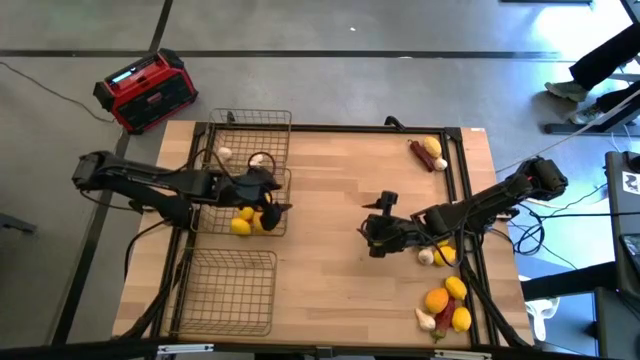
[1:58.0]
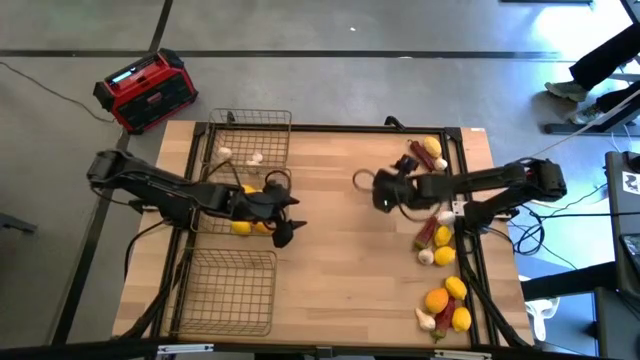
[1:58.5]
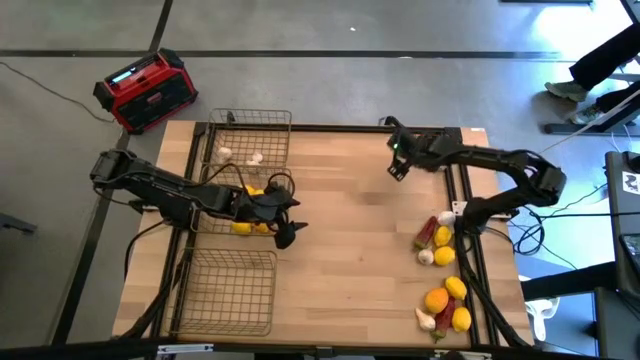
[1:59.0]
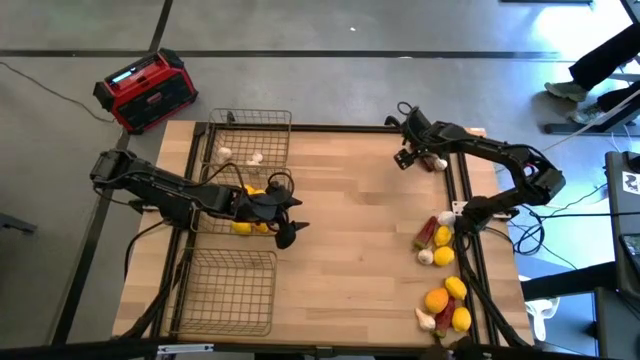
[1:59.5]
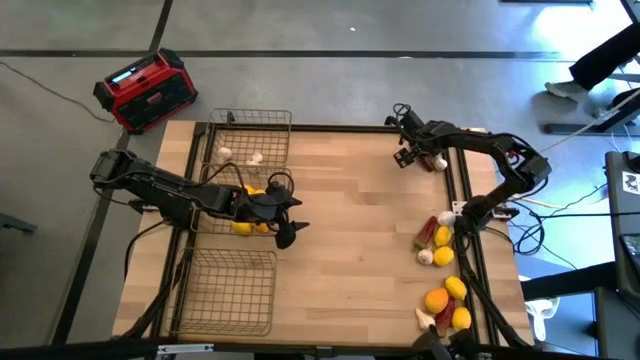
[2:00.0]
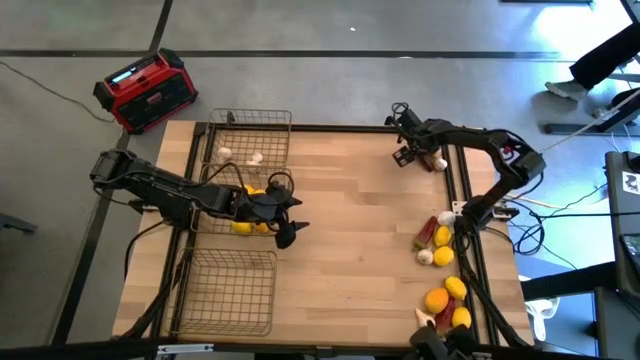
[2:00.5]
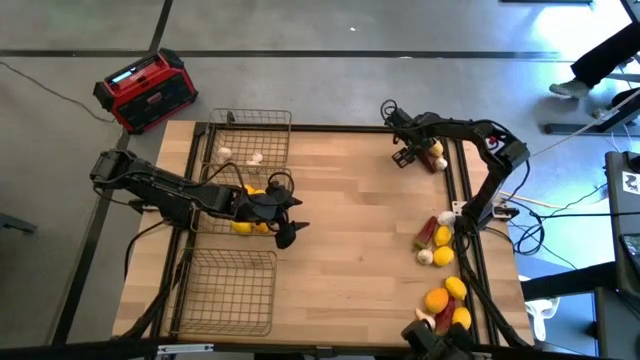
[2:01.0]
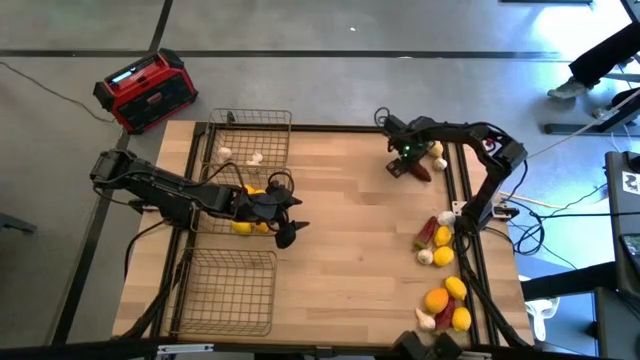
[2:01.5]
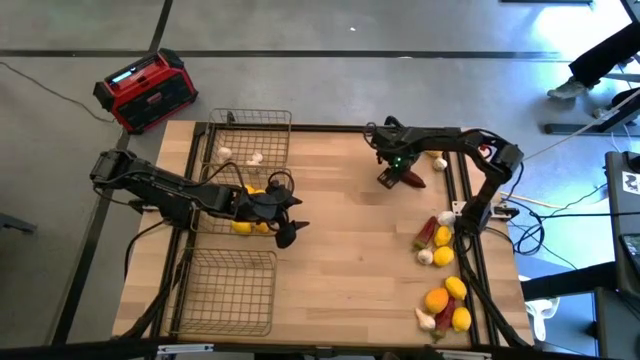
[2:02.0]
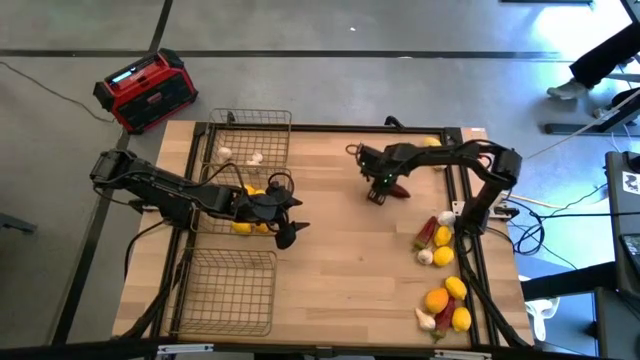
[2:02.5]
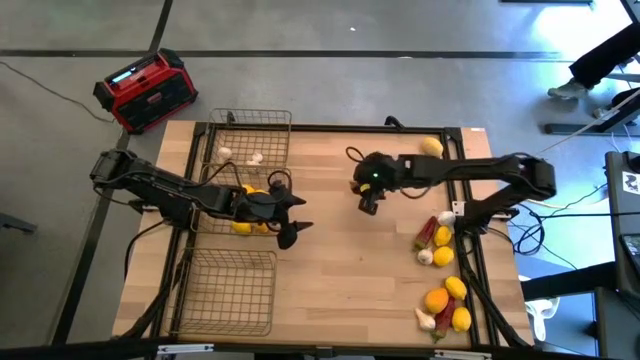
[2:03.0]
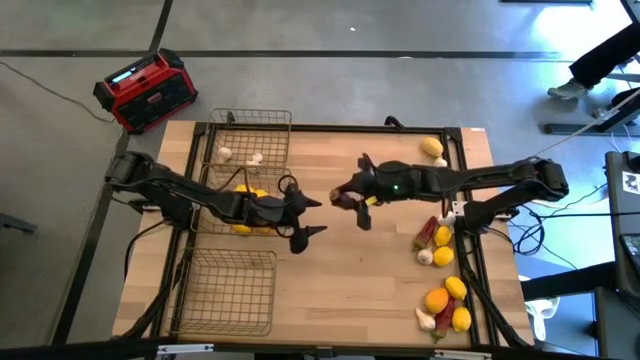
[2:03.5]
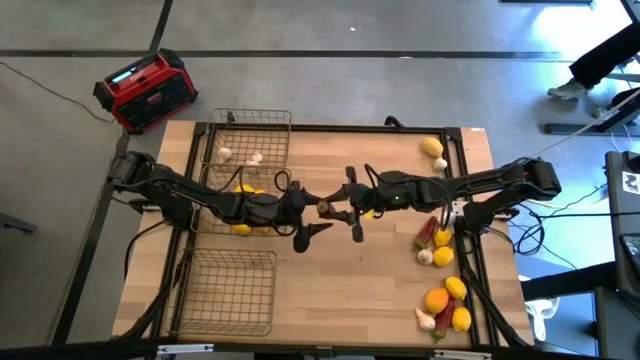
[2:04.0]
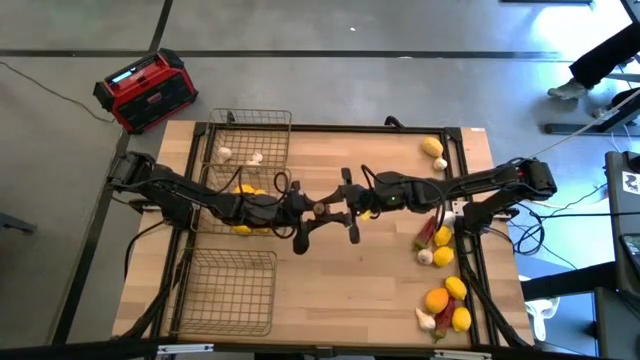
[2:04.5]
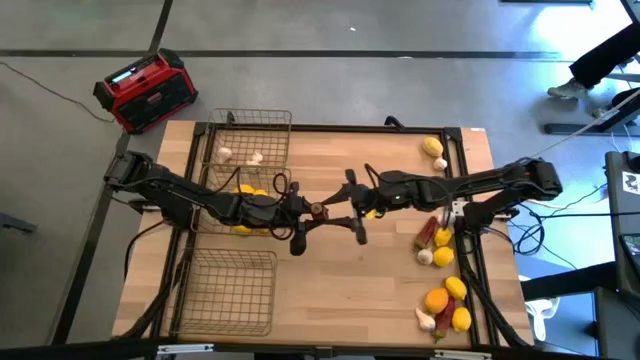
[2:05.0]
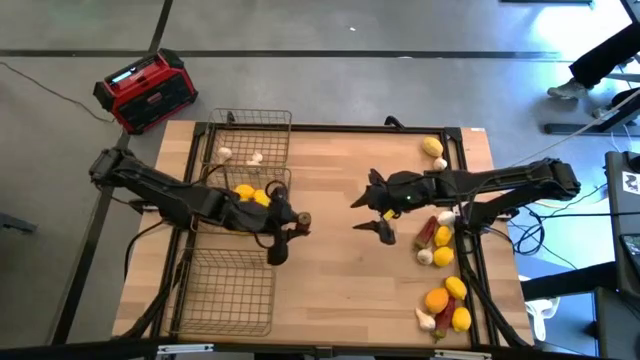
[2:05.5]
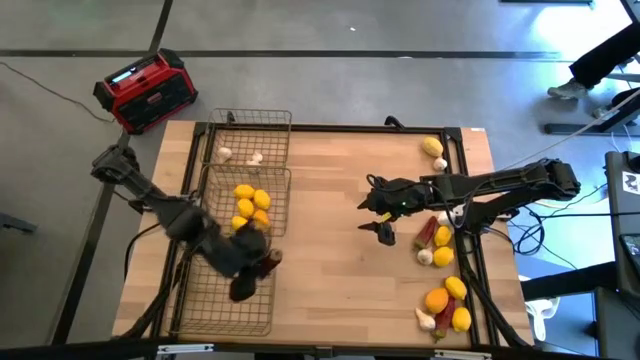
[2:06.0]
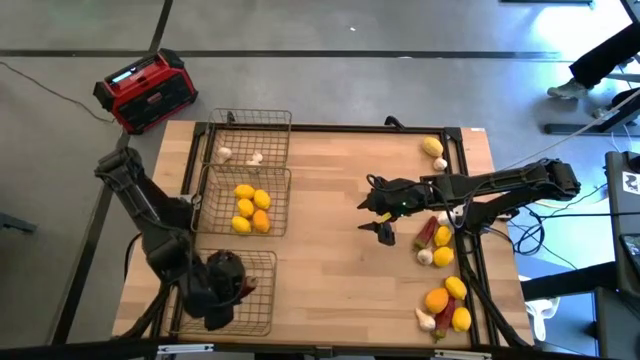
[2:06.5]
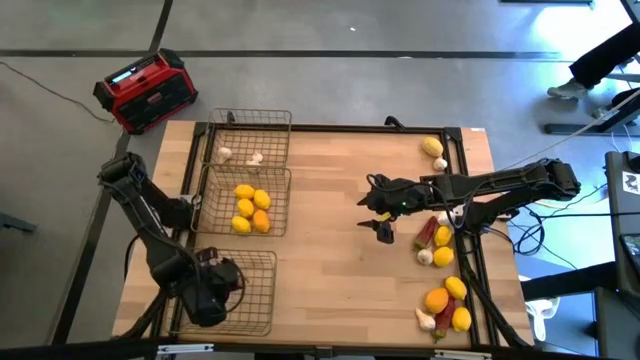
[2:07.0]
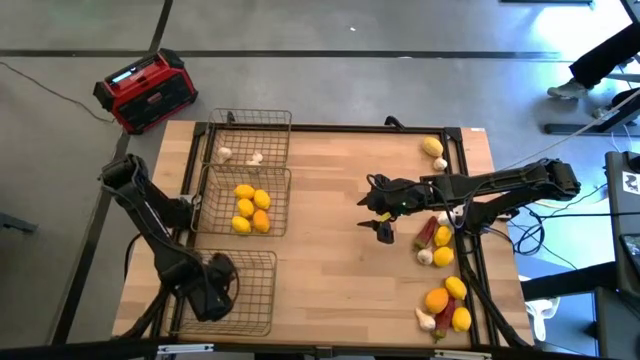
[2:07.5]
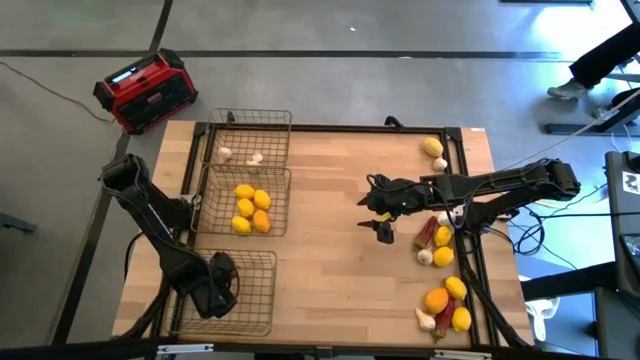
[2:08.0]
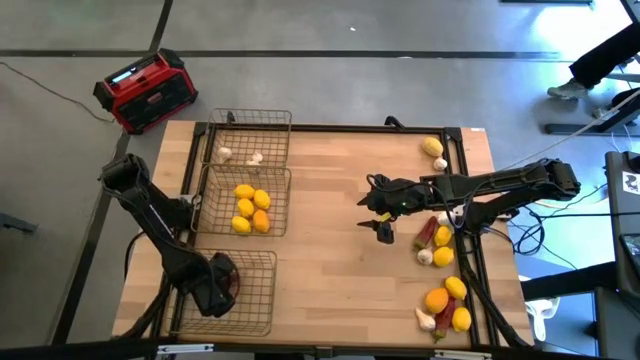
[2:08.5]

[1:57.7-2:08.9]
Task: Sort produce into baskets
Put the chili pepper in the bottom wire basket

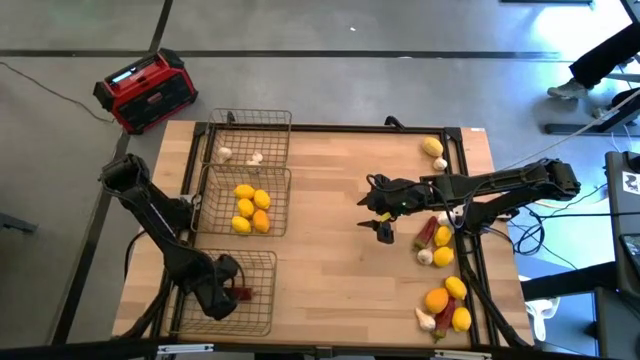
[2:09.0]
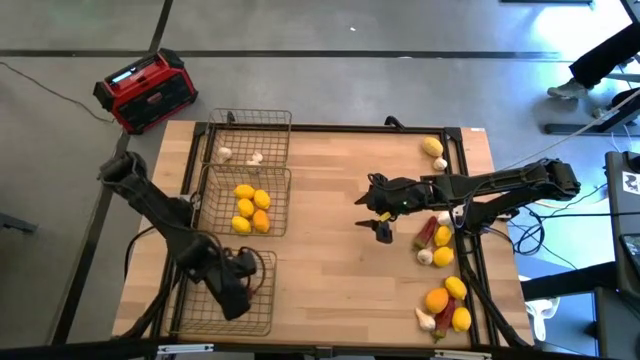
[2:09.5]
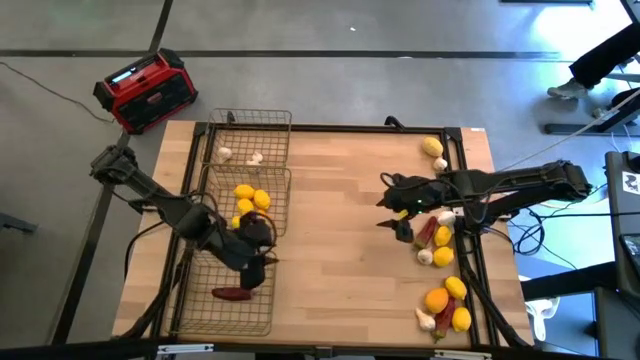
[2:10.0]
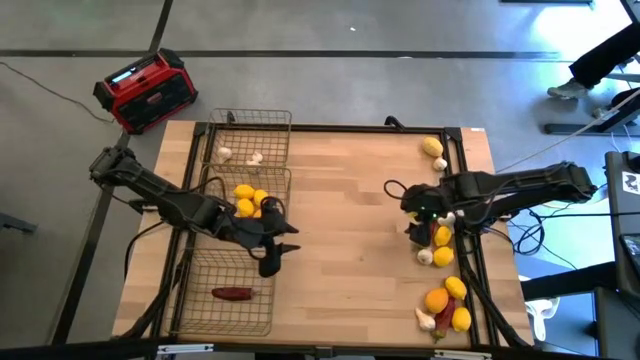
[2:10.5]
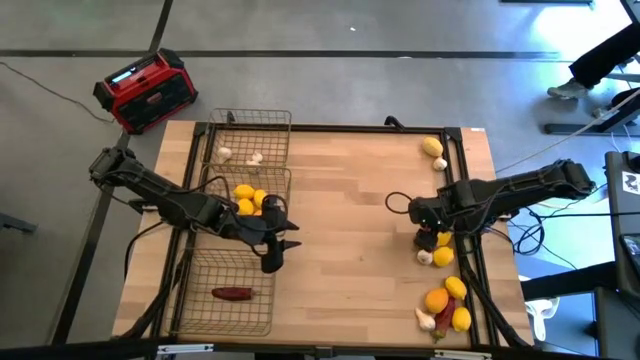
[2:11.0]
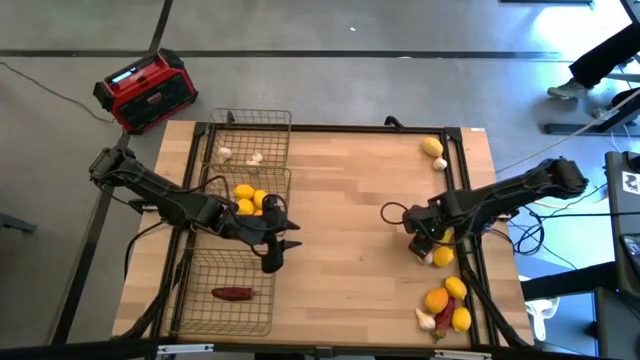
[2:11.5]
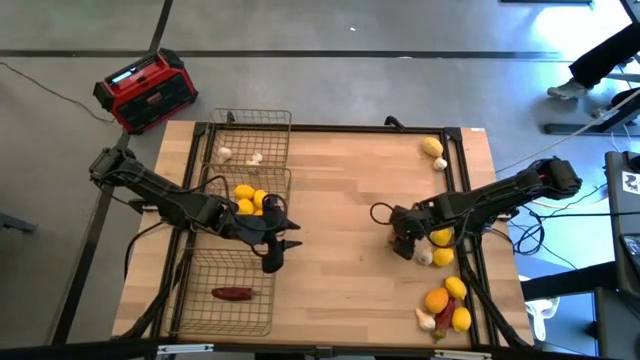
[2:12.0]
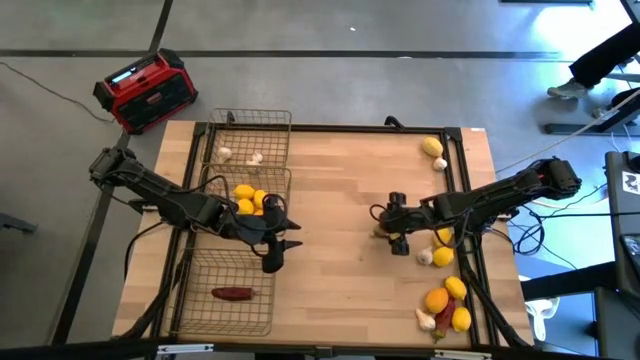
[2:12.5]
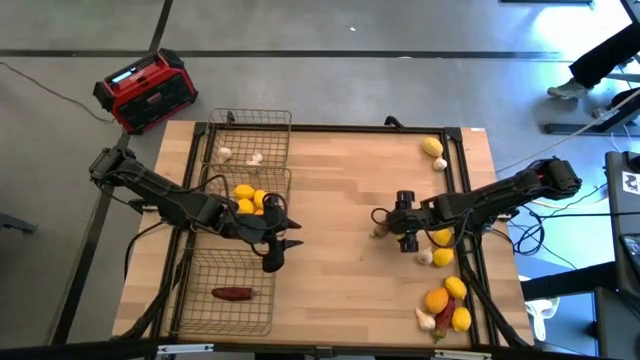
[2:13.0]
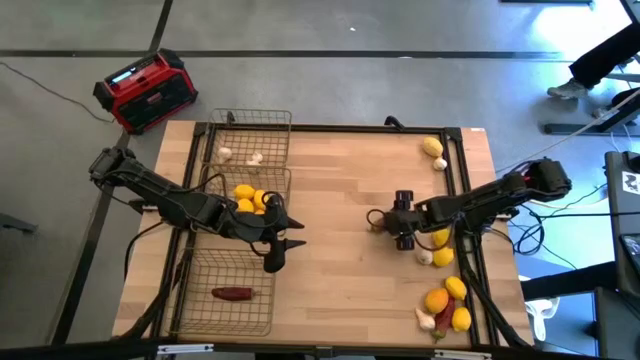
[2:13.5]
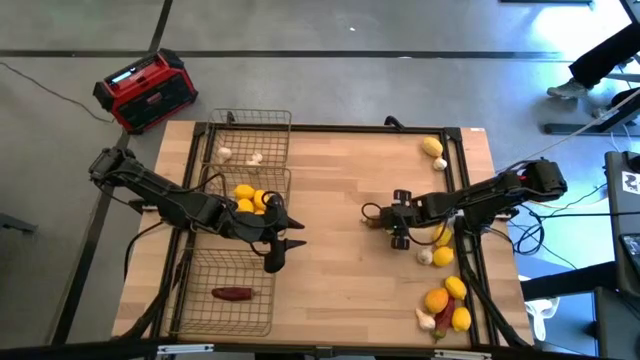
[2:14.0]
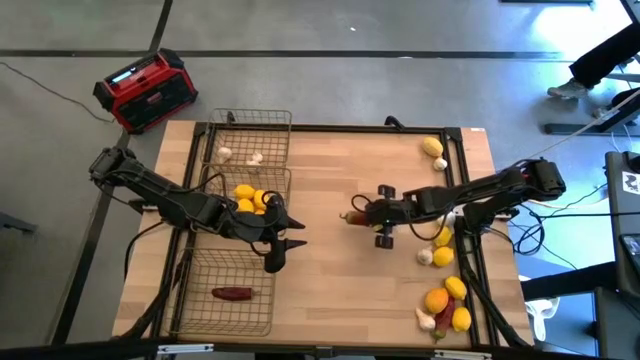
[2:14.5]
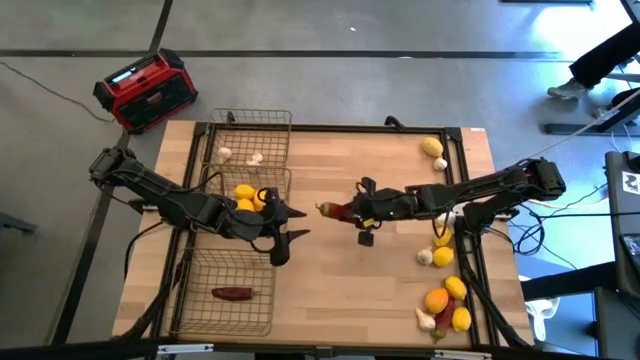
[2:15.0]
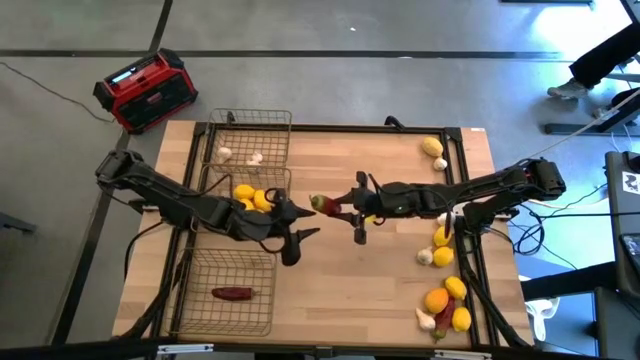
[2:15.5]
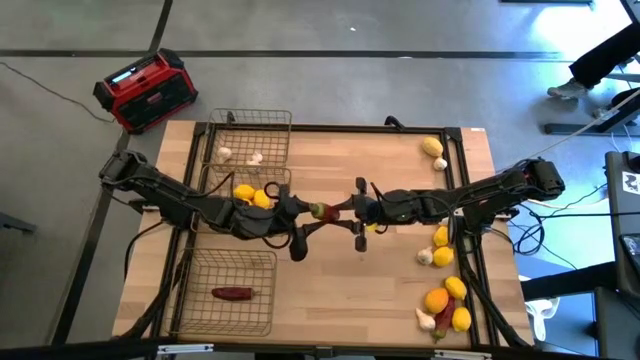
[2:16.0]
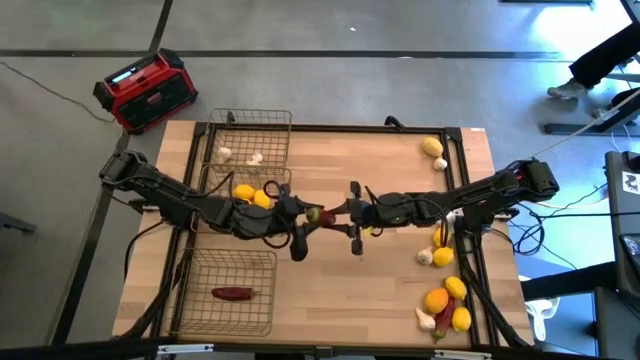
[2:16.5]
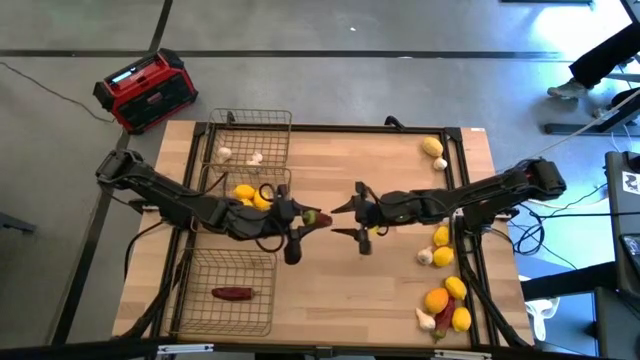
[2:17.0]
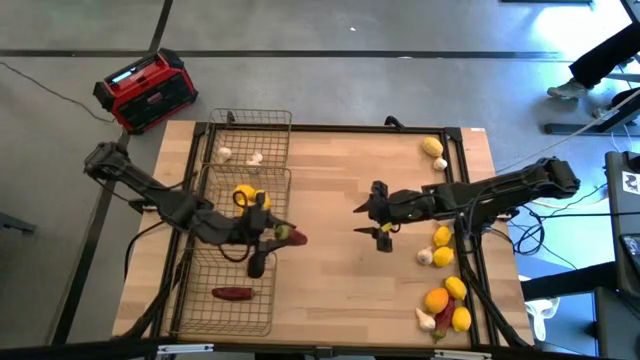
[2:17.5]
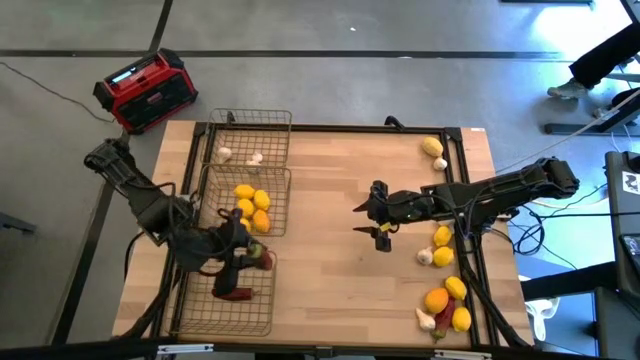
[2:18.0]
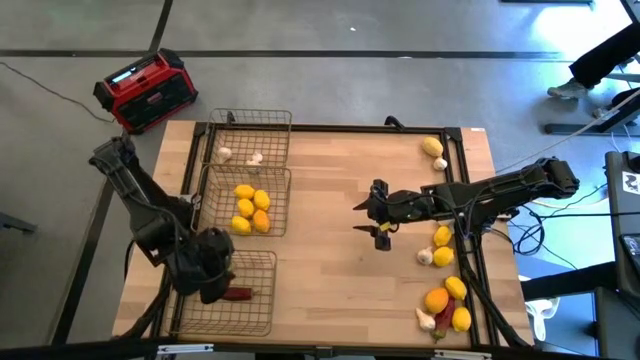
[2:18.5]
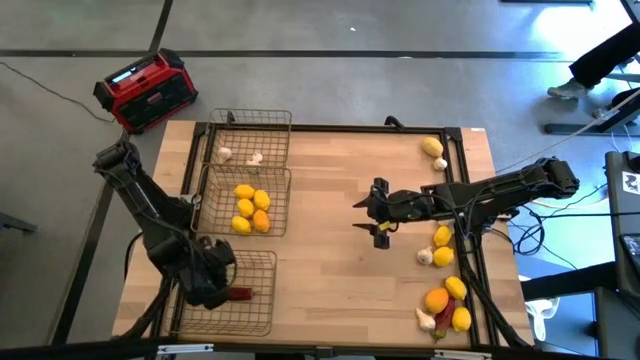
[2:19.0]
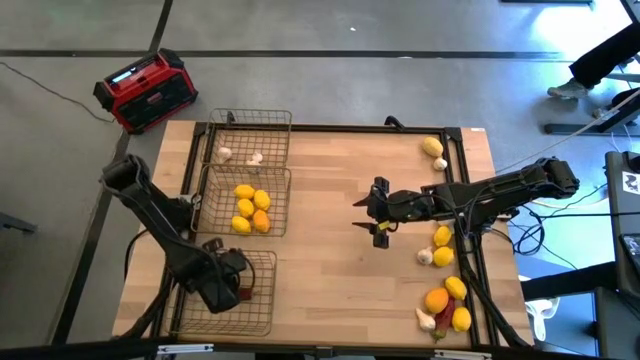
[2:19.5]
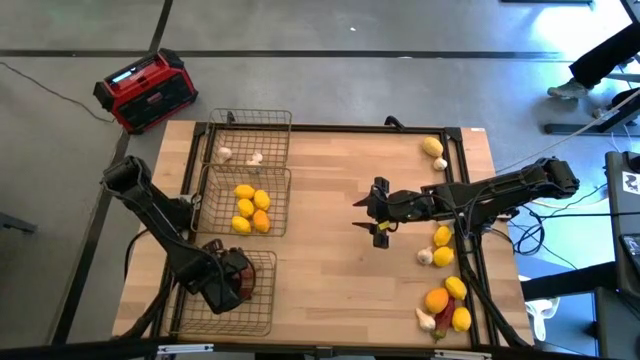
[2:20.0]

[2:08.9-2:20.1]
Put the chili pepper in the bottom wire basket
